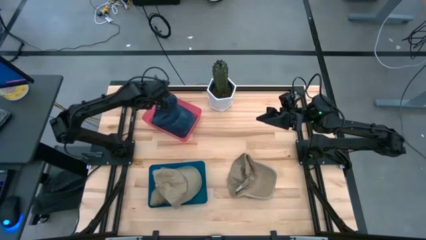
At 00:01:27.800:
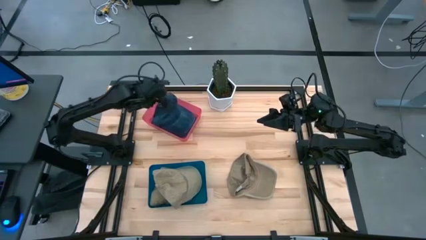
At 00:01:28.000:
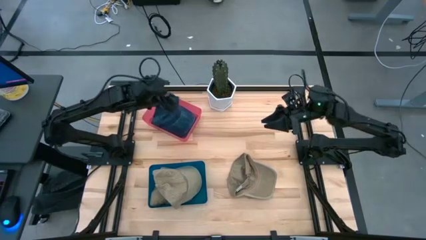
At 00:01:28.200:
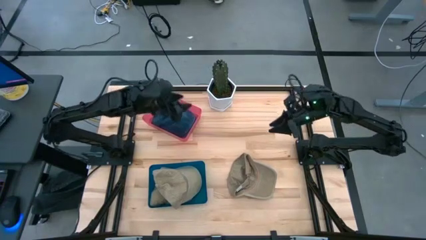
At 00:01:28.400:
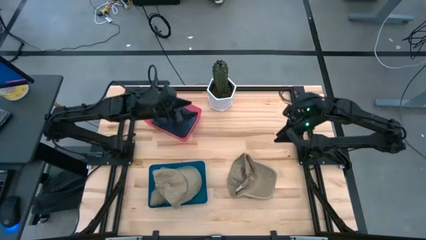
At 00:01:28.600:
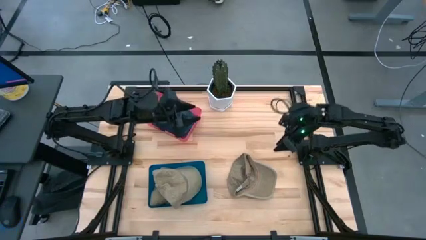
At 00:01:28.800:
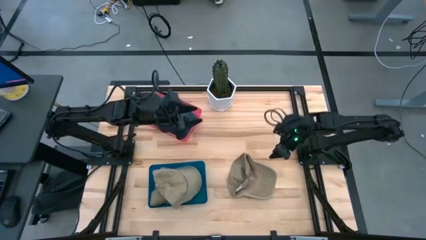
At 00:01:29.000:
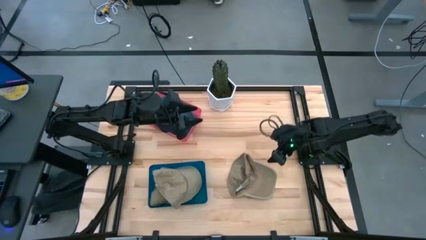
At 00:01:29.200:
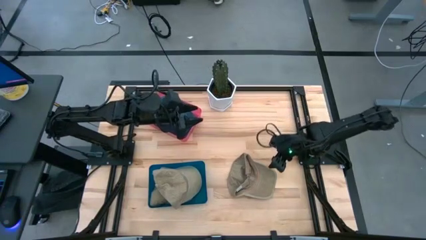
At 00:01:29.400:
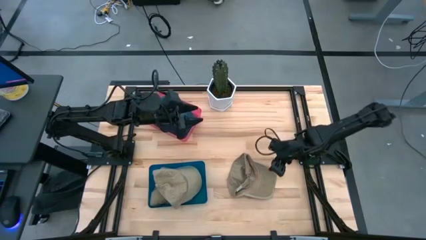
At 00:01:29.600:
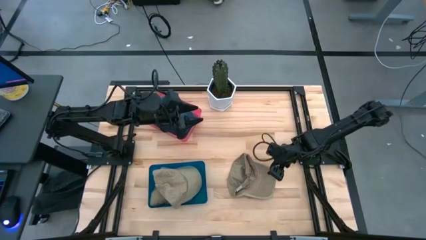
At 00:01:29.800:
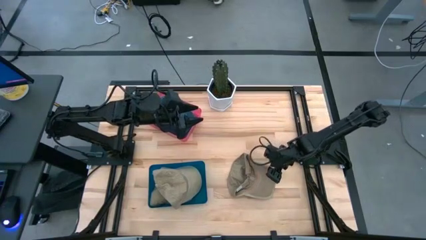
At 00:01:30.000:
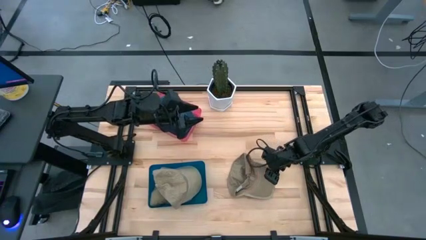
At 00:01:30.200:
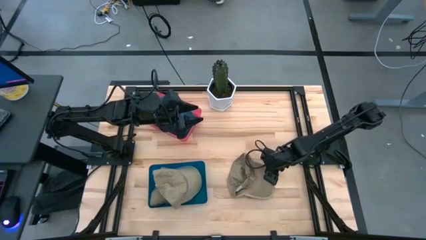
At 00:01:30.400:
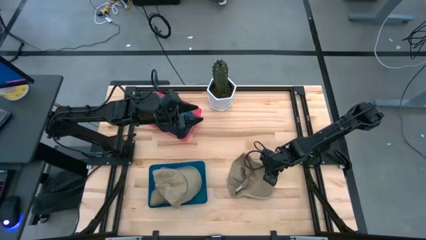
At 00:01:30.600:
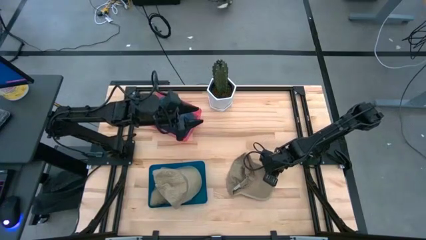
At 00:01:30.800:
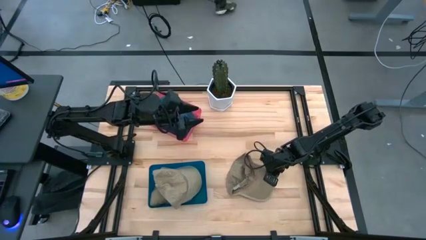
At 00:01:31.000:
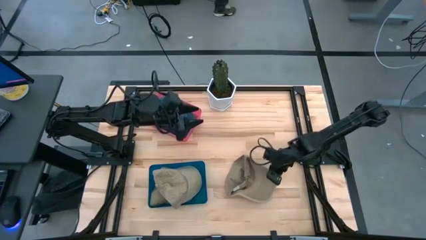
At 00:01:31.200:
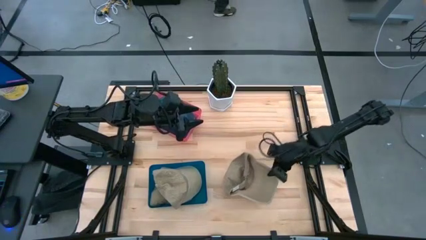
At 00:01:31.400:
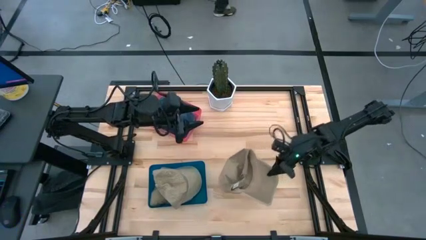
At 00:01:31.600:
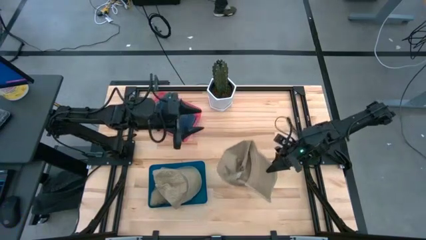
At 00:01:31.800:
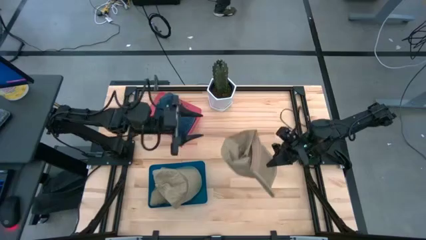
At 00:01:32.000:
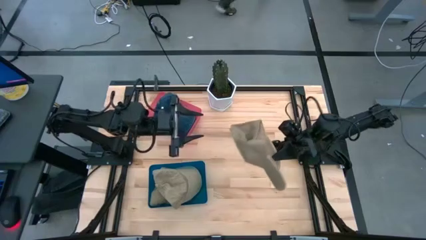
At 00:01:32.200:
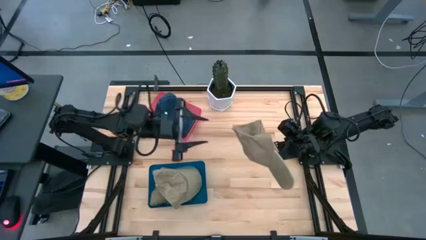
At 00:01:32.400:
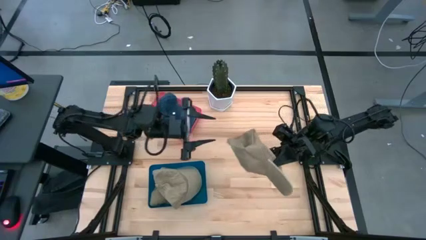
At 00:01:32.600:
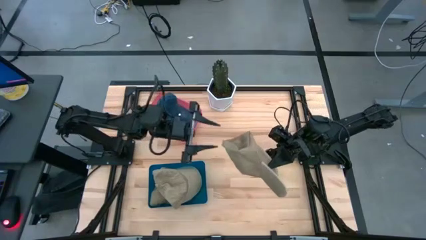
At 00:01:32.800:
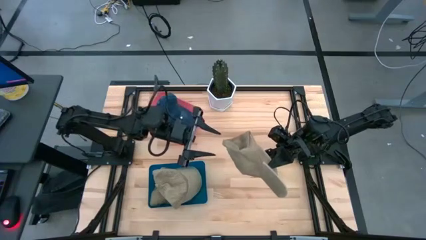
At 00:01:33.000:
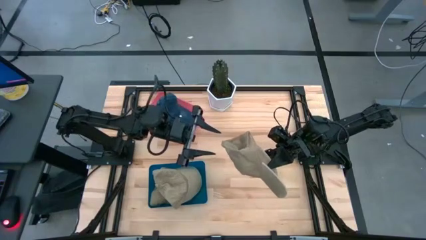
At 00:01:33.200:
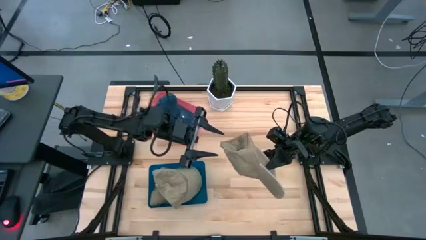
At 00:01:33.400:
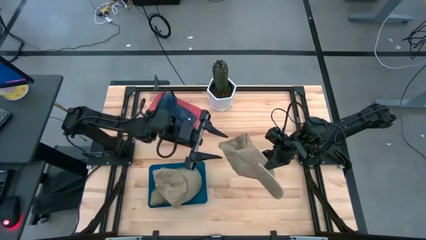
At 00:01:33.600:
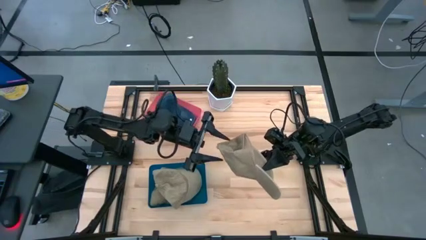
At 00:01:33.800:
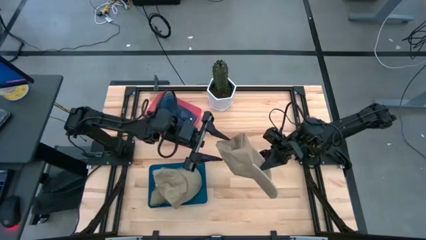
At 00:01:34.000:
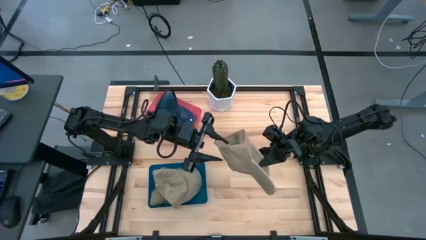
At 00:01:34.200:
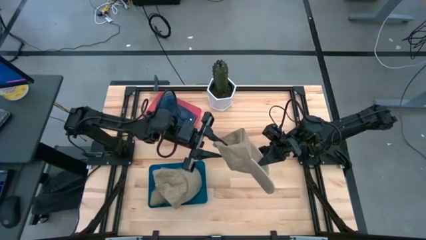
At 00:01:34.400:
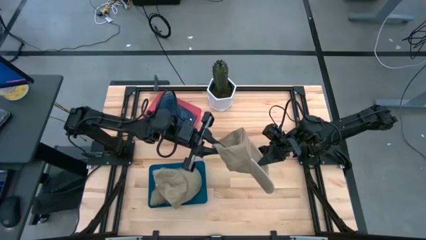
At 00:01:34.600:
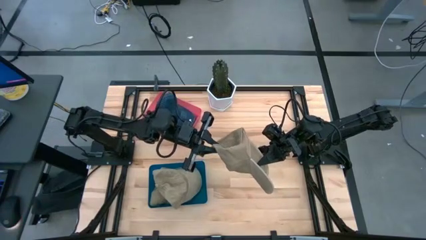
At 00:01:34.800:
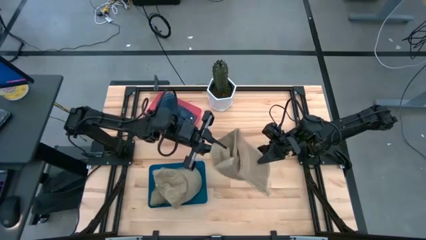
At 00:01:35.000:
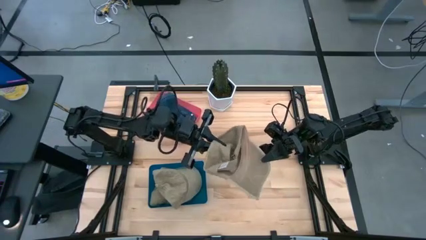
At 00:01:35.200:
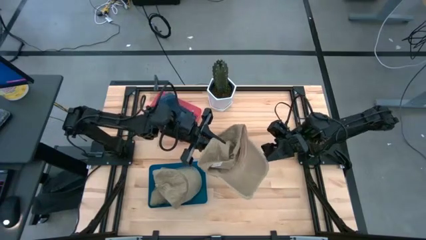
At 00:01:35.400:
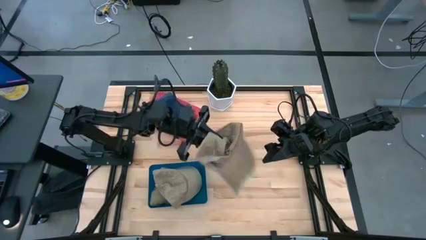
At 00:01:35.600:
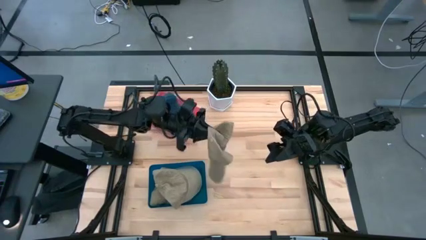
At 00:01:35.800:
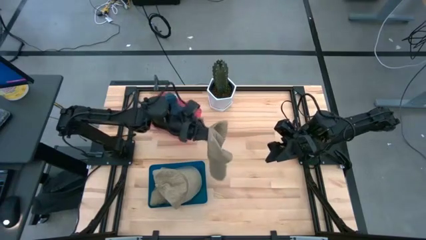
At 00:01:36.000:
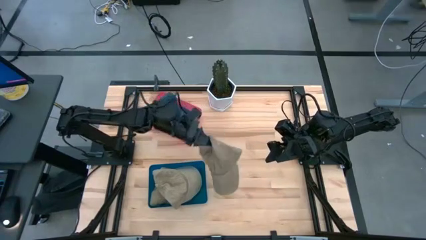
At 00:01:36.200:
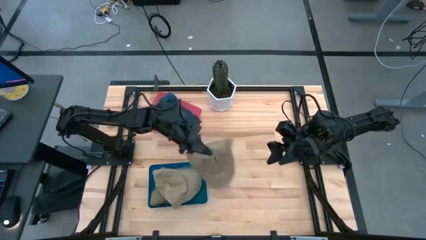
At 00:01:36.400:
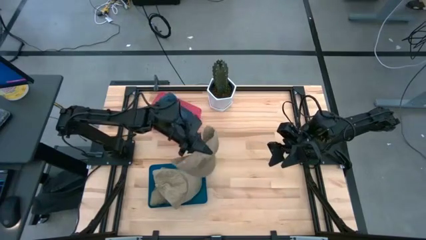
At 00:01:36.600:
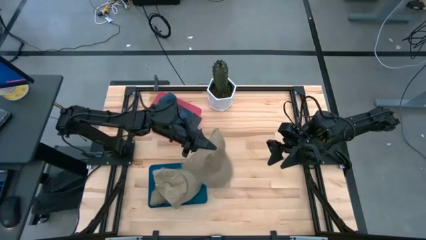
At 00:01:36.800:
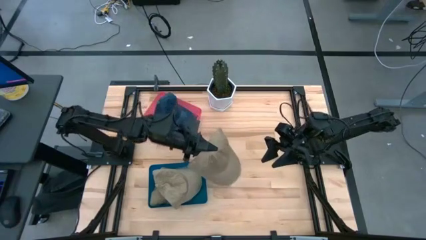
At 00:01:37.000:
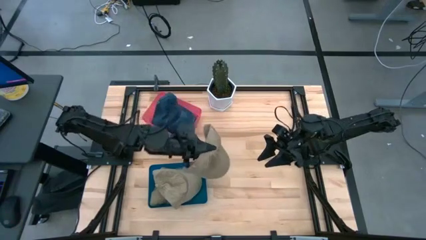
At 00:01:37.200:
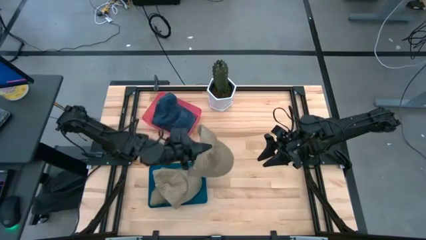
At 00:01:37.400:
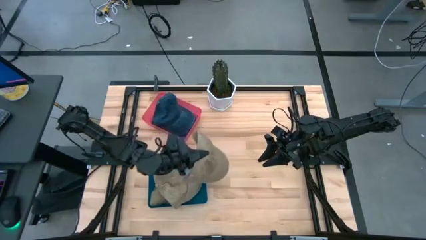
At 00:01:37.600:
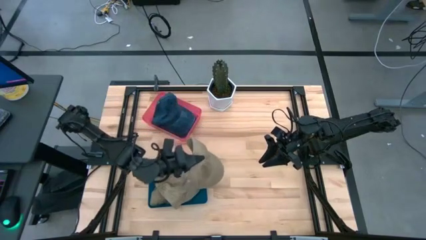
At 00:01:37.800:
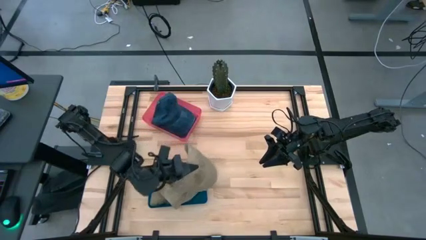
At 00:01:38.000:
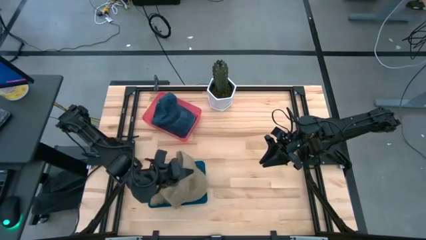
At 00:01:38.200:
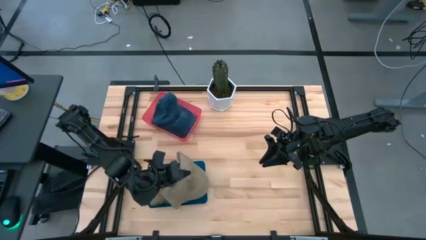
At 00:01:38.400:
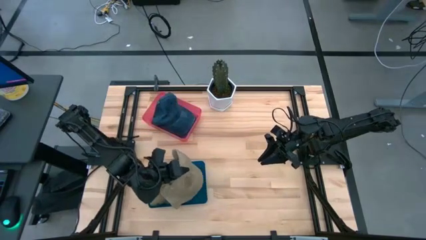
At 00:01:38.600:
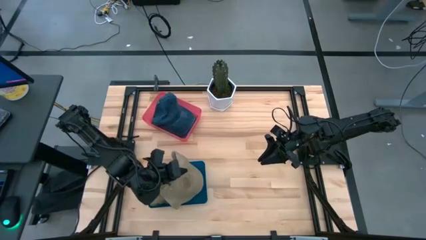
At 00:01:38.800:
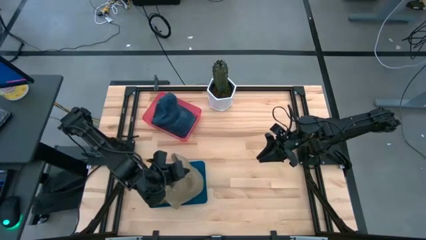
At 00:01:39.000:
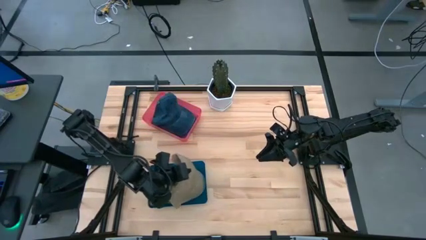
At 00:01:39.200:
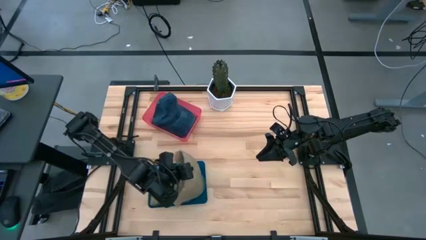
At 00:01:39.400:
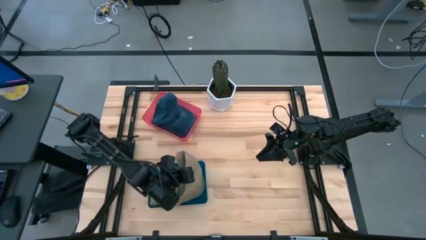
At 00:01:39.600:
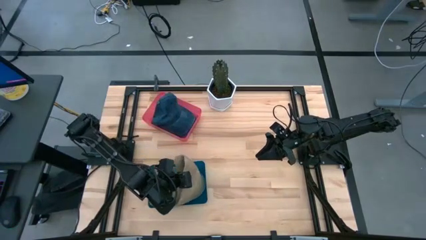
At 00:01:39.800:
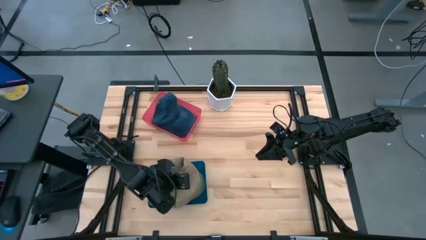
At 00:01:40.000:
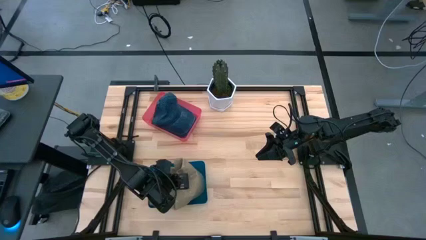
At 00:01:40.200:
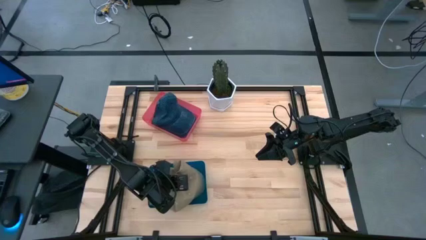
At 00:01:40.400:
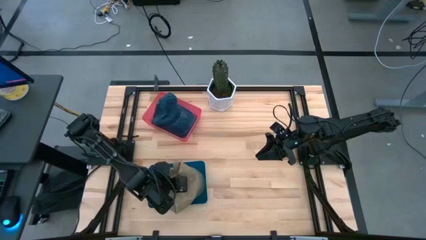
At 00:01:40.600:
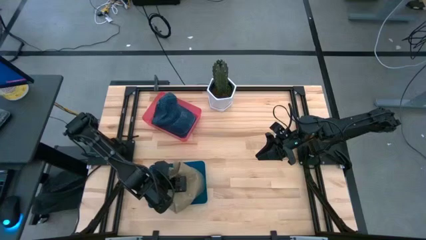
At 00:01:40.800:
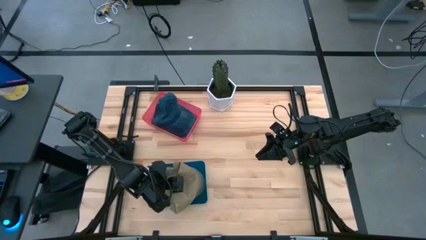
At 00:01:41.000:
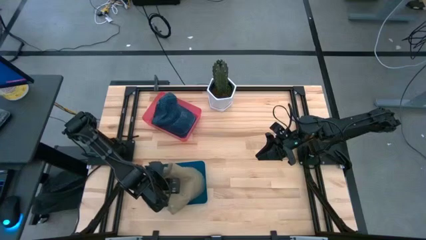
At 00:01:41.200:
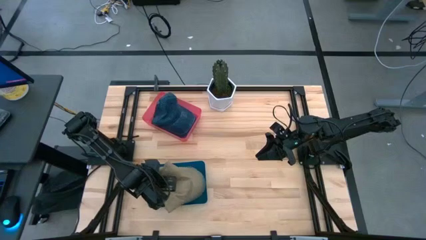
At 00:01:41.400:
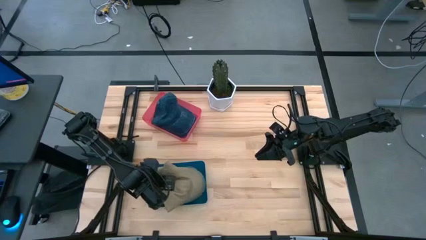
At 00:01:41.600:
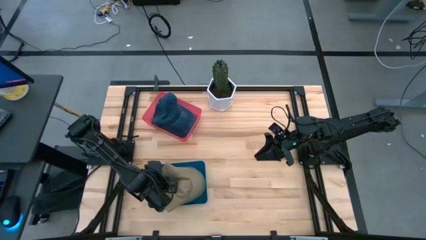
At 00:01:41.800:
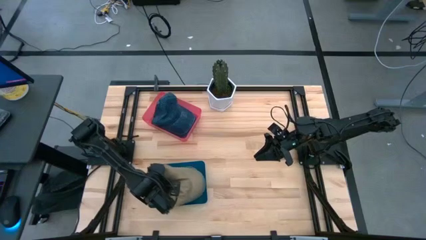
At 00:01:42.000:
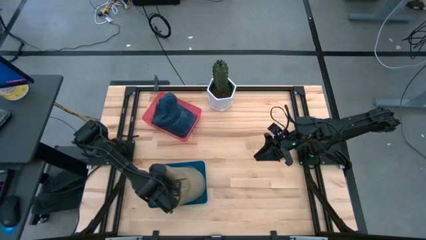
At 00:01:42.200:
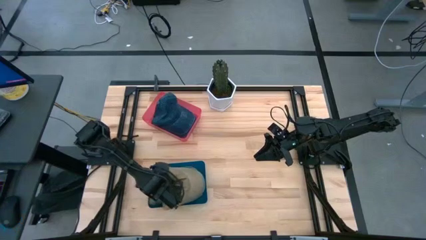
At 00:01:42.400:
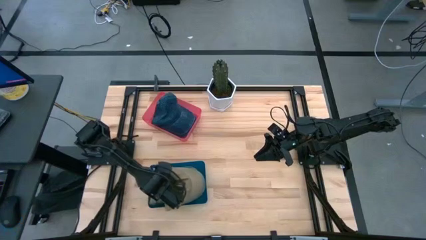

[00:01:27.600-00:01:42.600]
Task: Pick & Place hat
Put the brown cap into the blue bin
